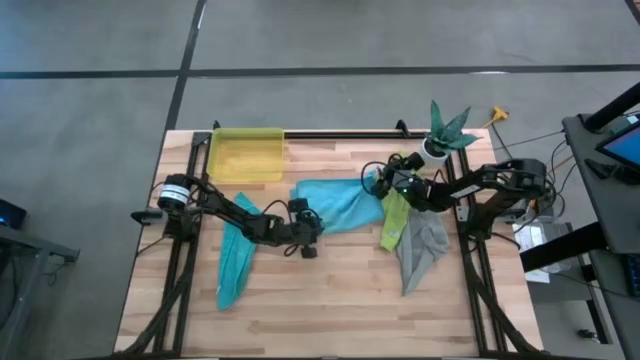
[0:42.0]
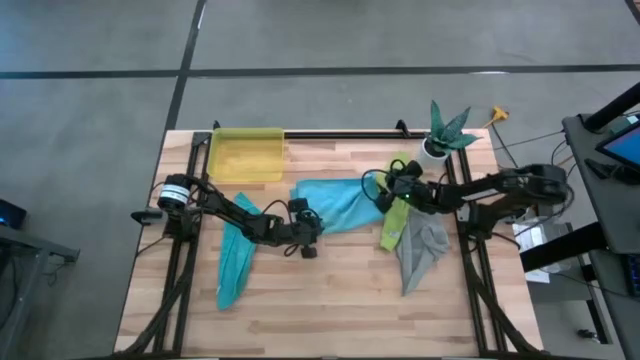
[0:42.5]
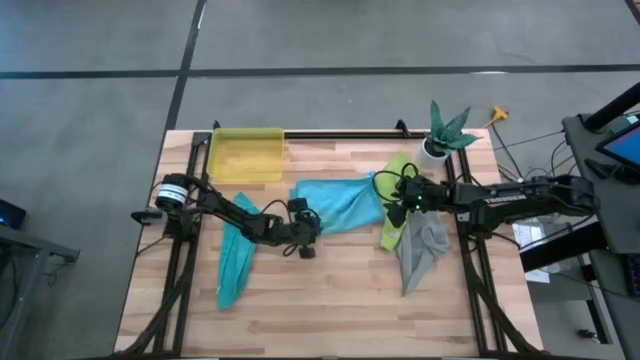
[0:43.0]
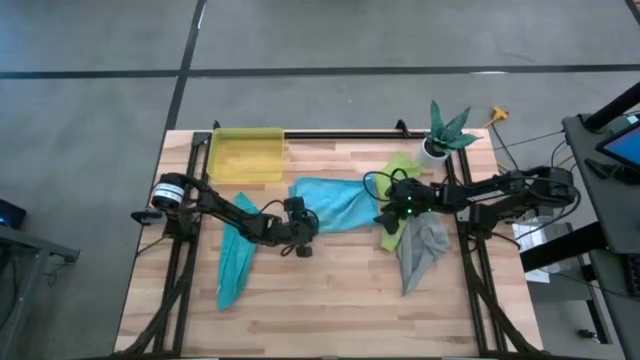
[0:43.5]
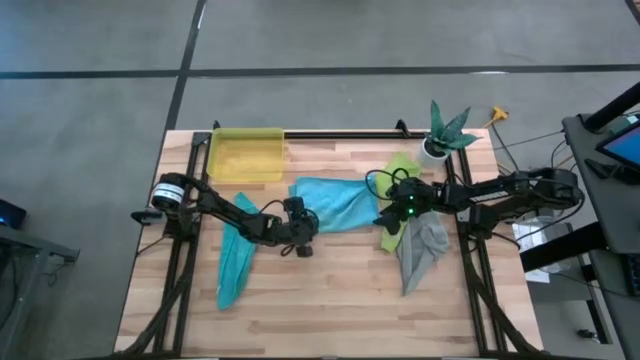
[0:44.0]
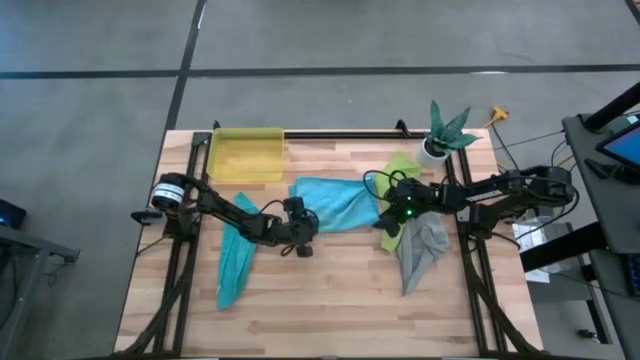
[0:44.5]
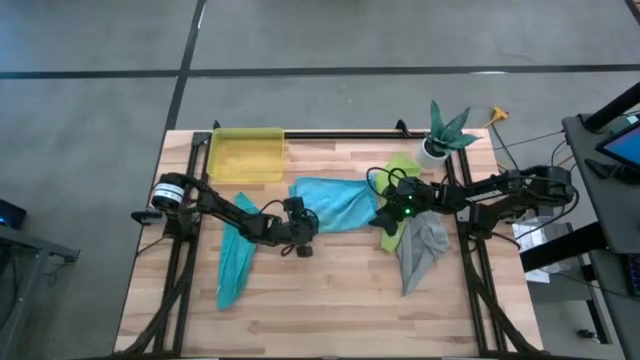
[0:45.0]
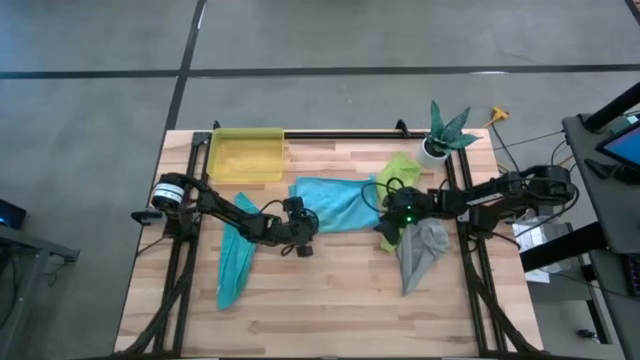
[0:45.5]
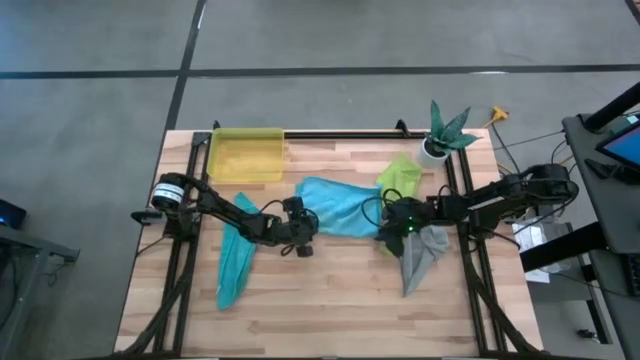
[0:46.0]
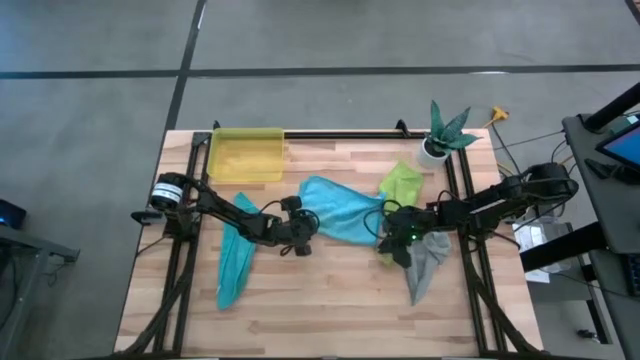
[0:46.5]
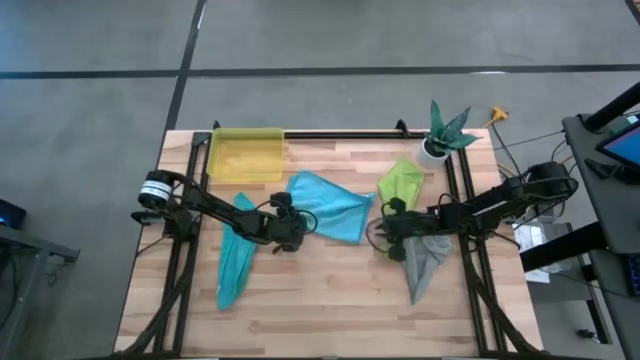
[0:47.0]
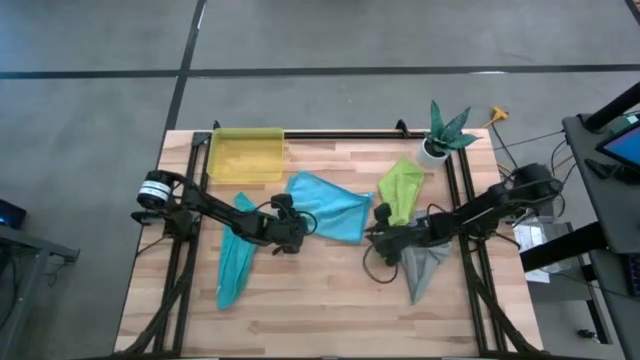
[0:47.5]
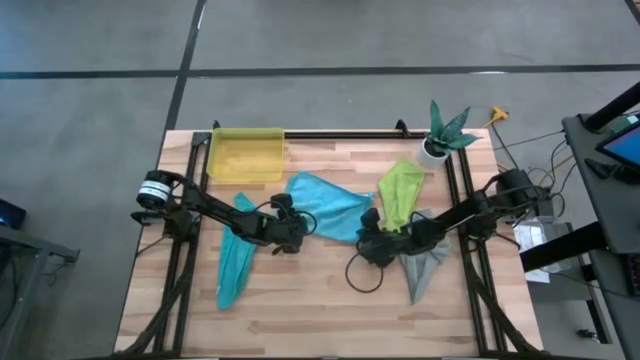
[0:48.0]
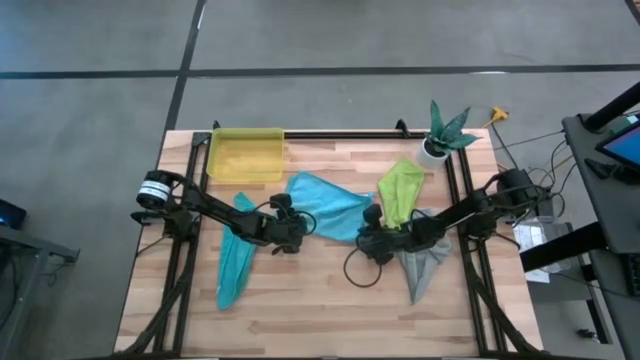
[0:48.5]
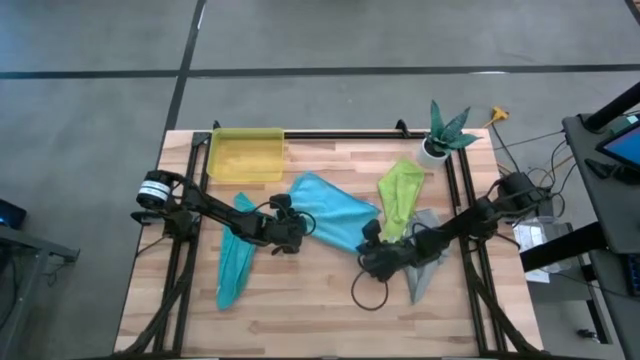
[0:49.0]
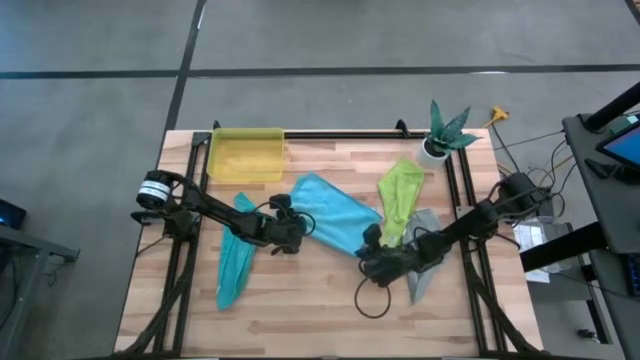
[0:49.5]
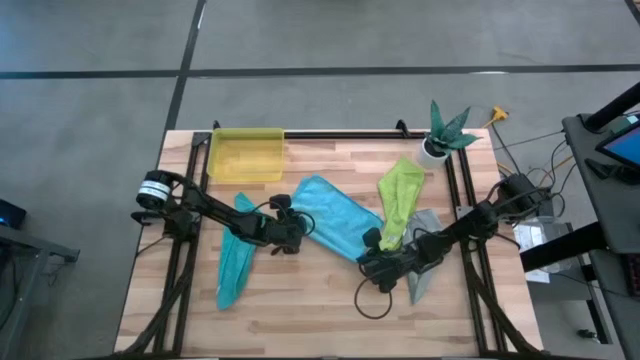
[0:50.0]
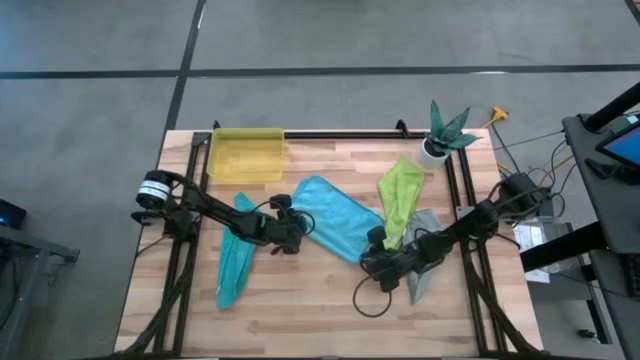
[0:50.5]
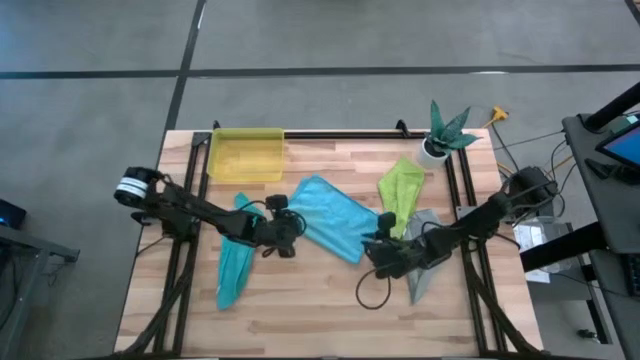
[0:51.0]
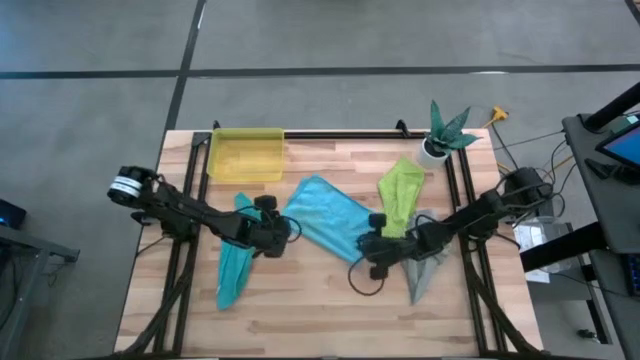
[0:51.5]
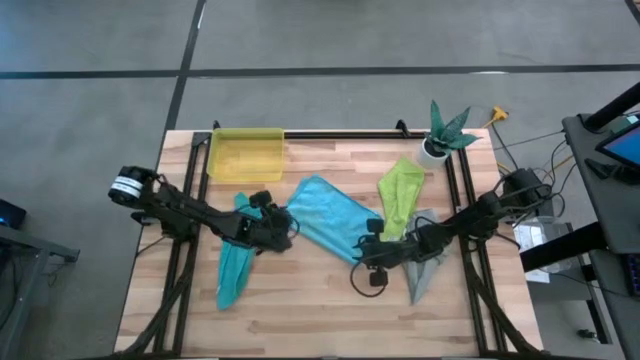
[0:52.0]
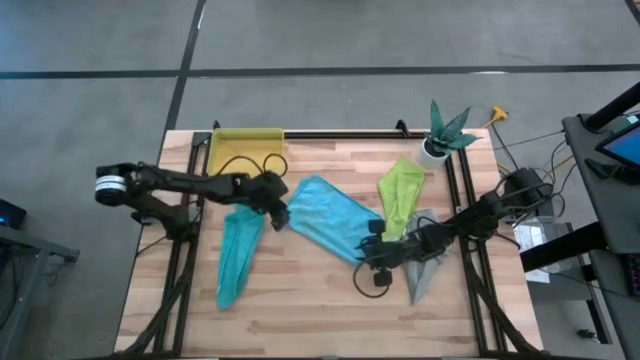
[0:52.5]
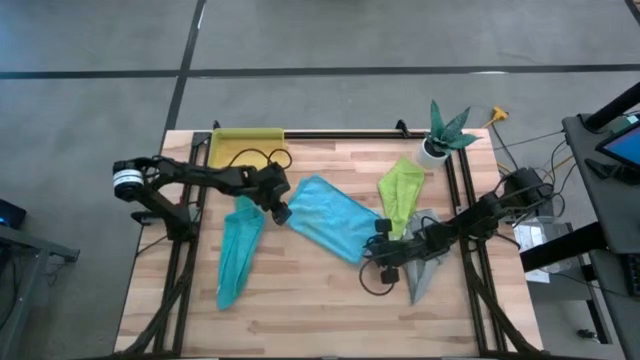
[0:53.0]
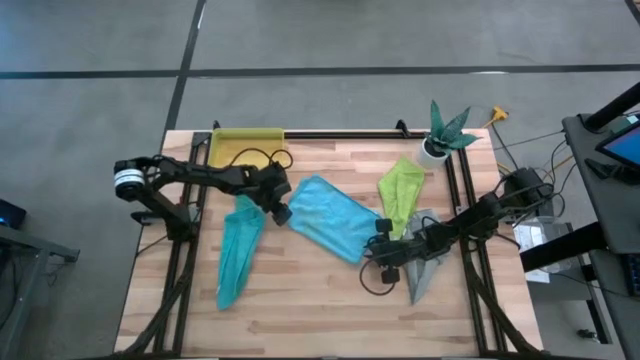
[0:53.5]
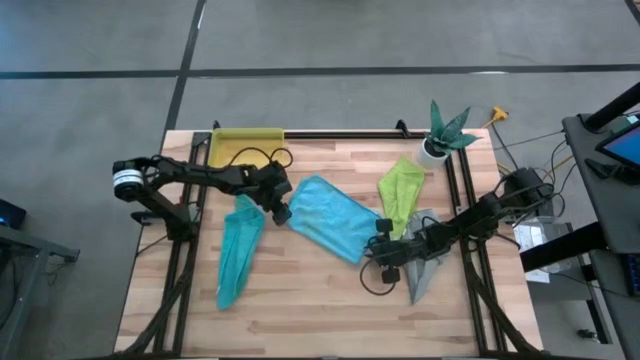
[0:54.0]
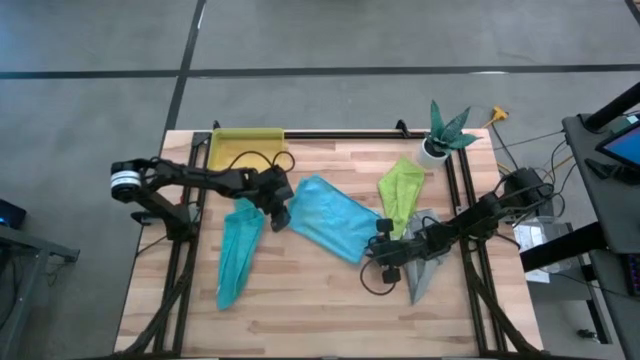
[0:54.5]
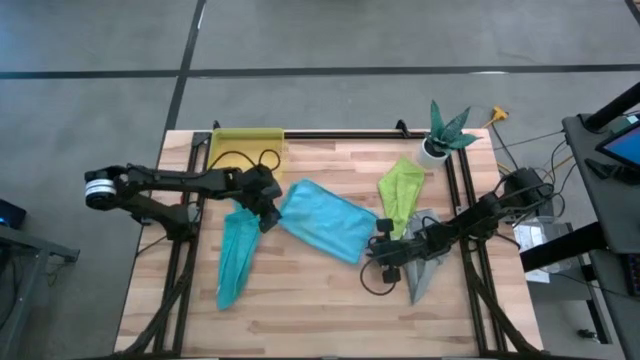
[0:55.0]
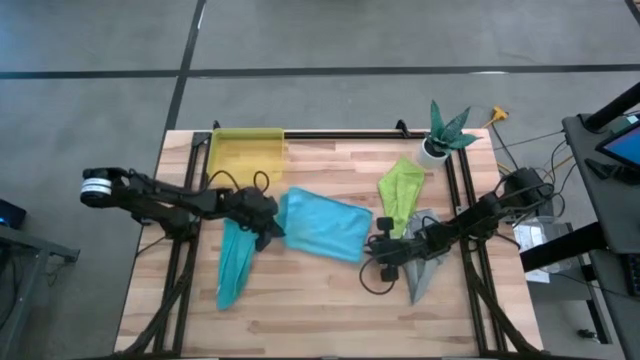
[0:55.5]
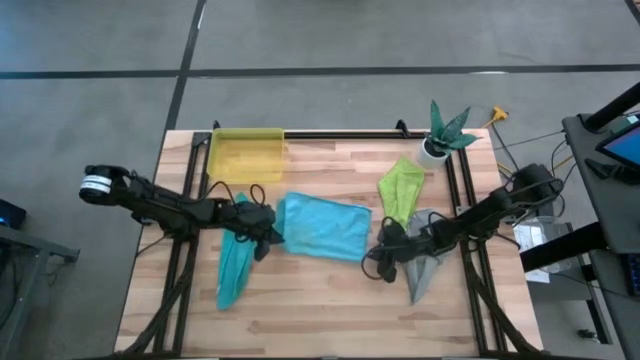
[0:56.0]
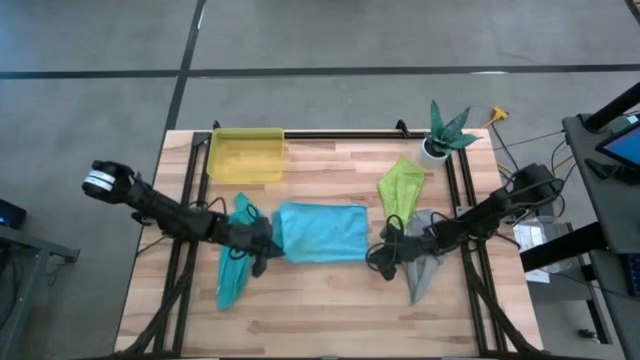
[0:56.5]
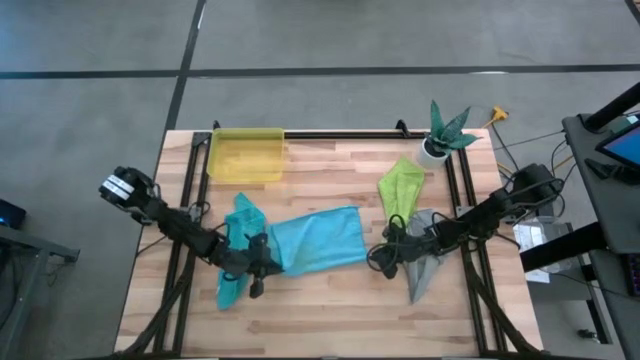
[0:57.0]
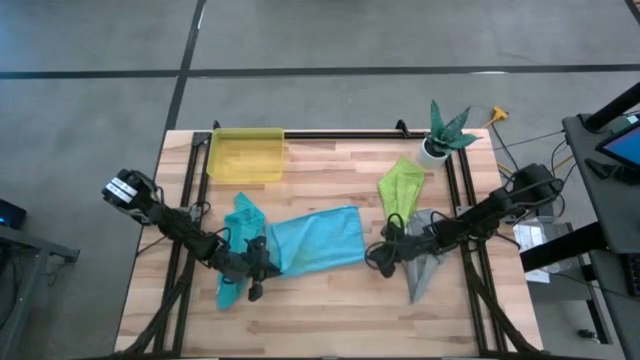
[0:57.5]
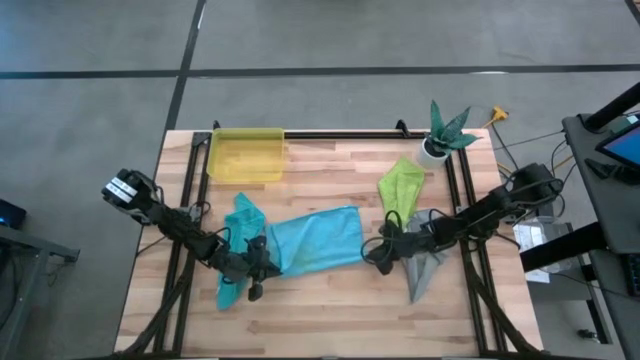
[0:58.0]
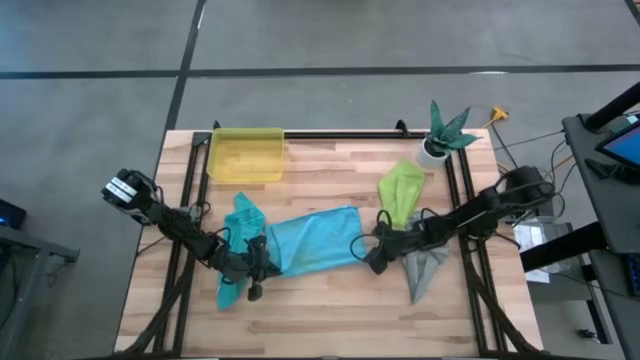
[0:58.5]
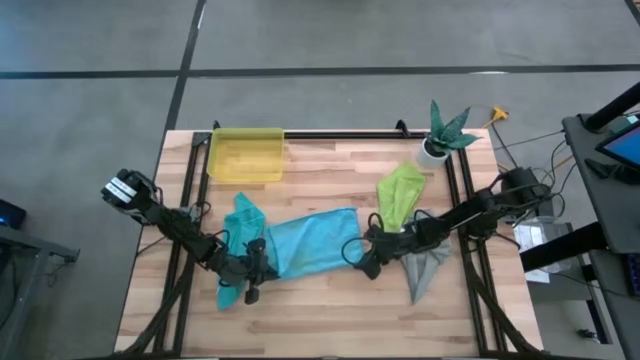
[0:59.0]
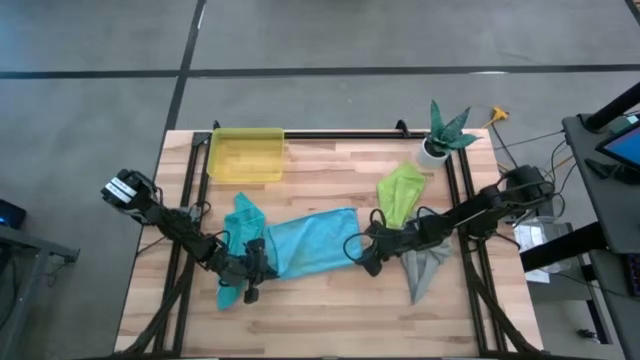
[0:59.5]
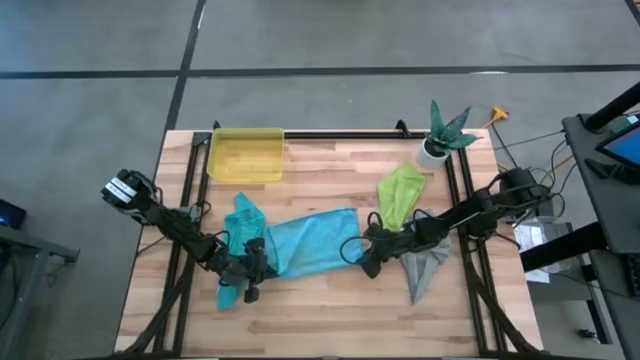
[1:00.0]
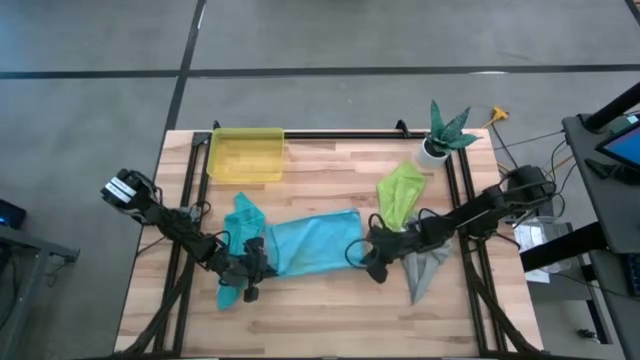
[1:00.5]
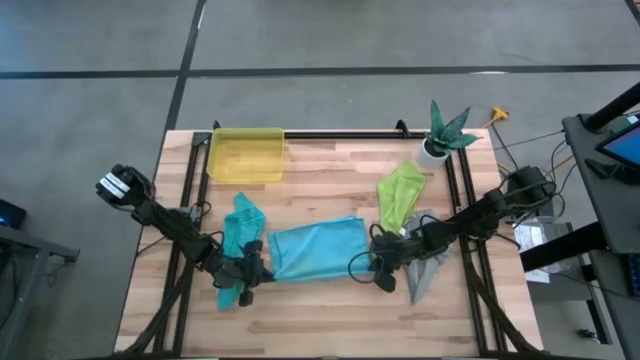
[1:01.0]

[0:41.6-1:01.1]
Task: Roll microfiber towels into tight, uniform cylinder then place into a basket
Roll the right light blue towel
